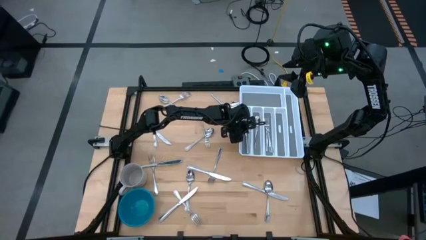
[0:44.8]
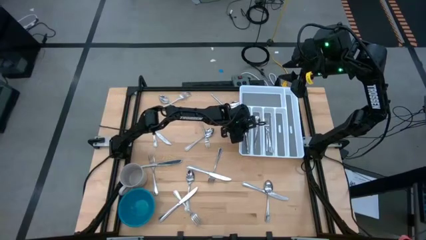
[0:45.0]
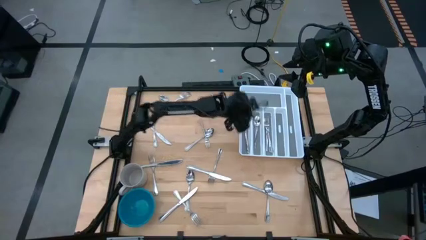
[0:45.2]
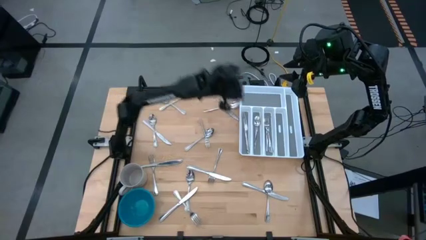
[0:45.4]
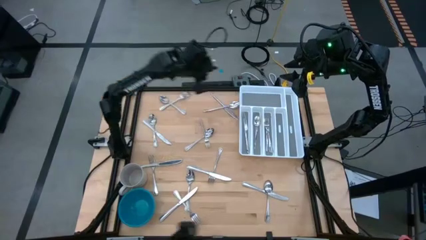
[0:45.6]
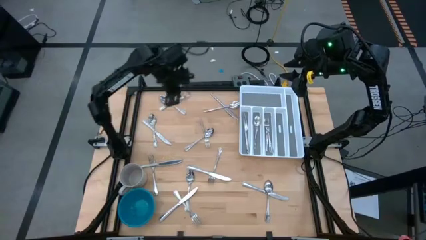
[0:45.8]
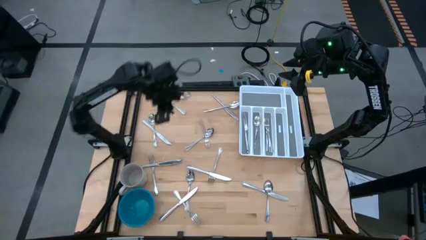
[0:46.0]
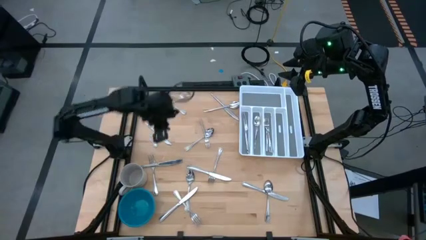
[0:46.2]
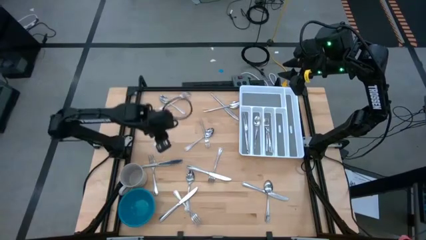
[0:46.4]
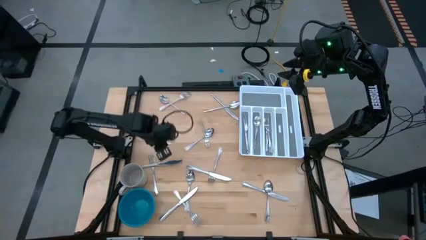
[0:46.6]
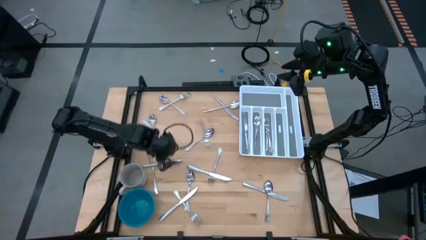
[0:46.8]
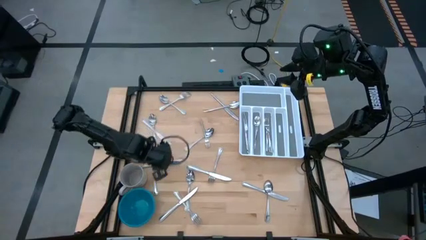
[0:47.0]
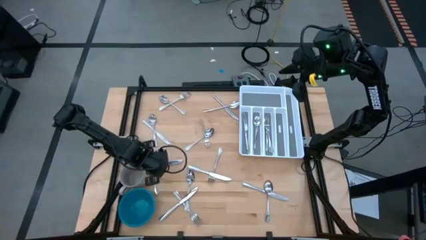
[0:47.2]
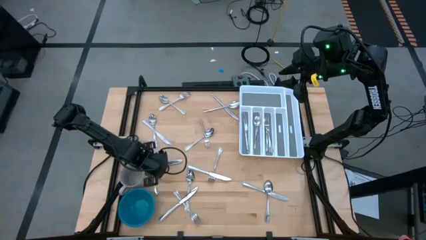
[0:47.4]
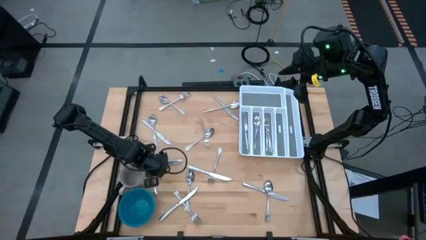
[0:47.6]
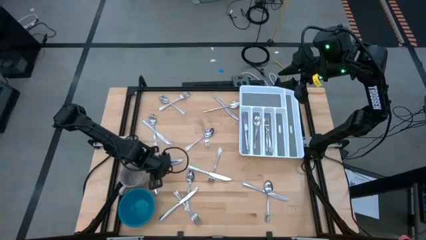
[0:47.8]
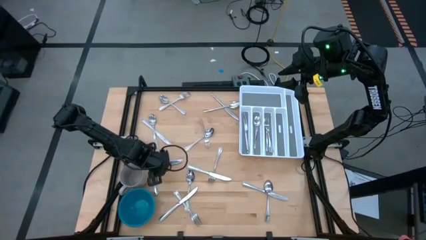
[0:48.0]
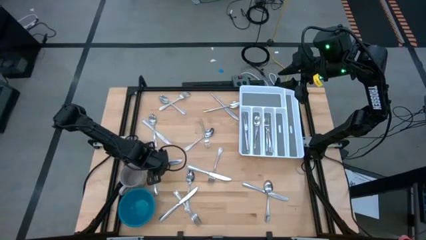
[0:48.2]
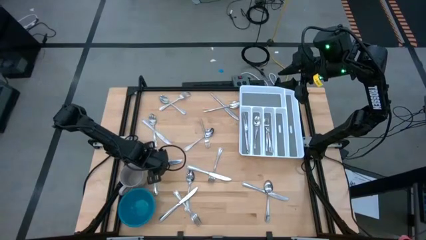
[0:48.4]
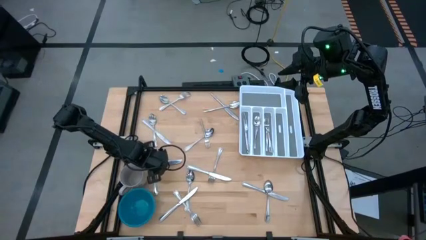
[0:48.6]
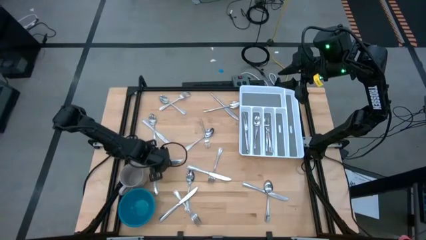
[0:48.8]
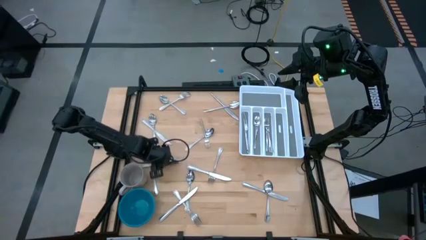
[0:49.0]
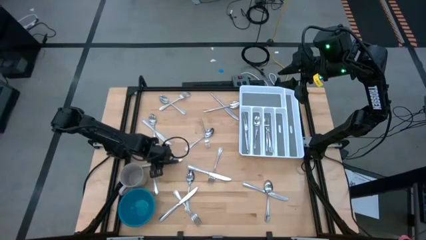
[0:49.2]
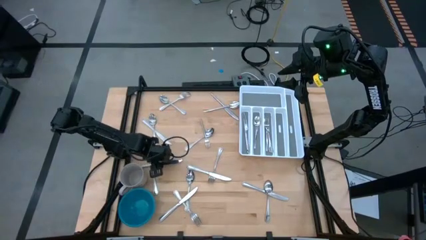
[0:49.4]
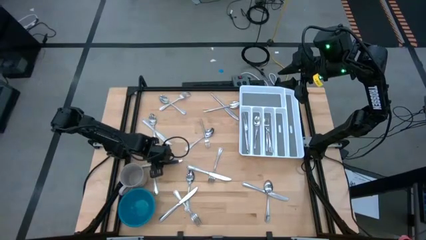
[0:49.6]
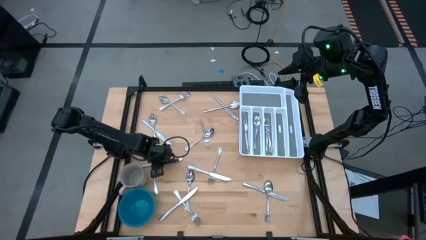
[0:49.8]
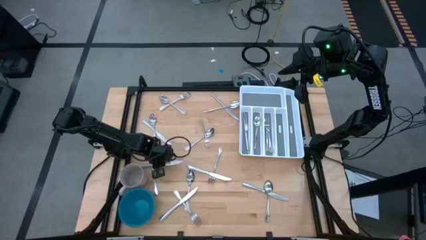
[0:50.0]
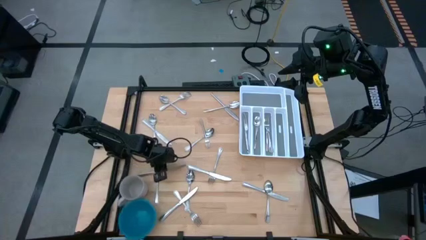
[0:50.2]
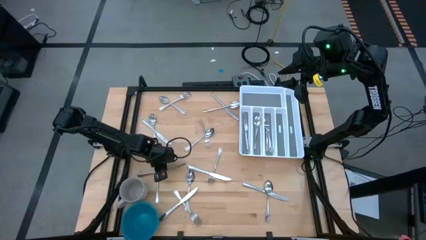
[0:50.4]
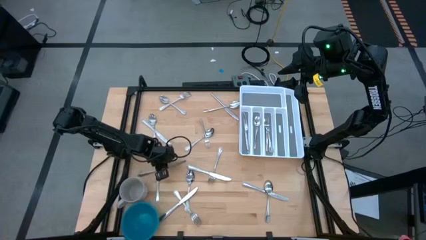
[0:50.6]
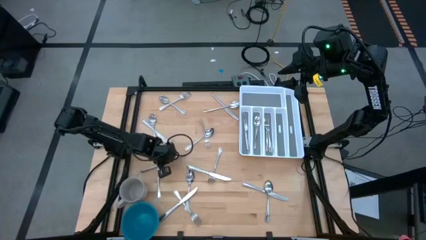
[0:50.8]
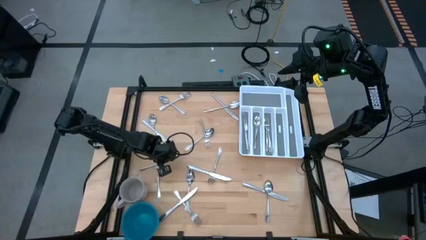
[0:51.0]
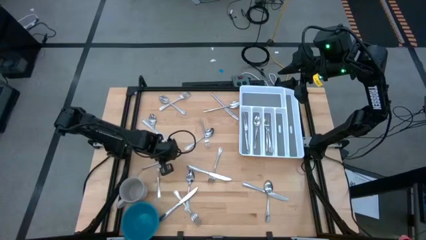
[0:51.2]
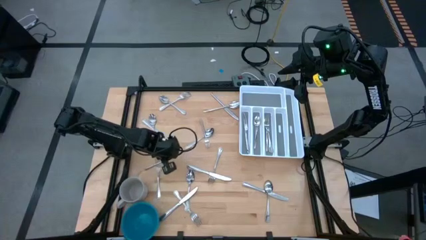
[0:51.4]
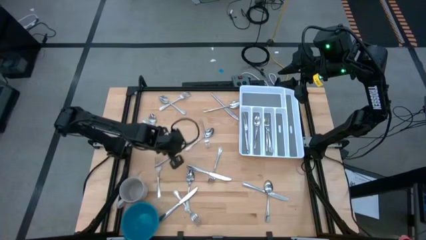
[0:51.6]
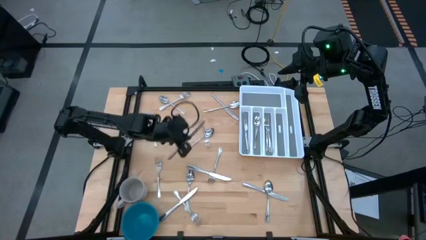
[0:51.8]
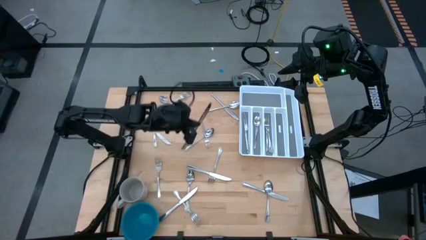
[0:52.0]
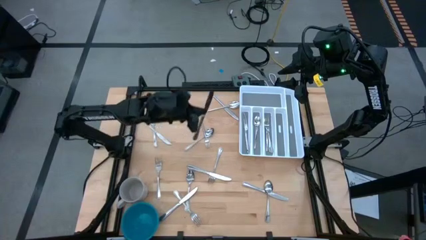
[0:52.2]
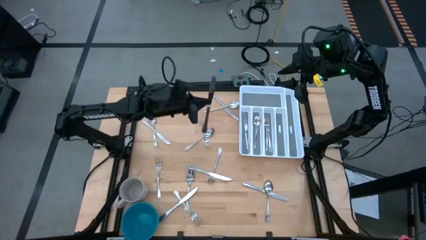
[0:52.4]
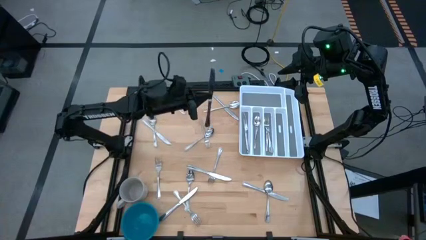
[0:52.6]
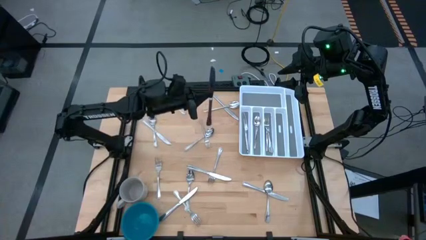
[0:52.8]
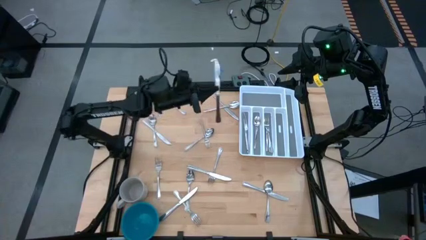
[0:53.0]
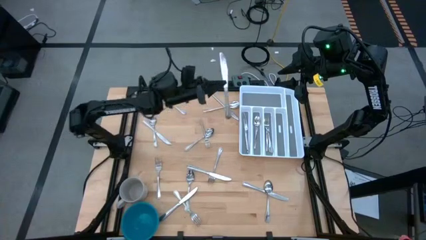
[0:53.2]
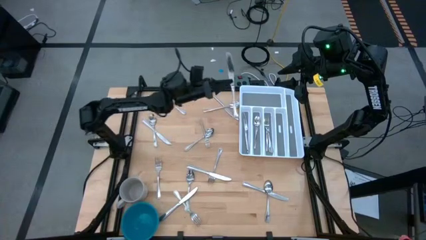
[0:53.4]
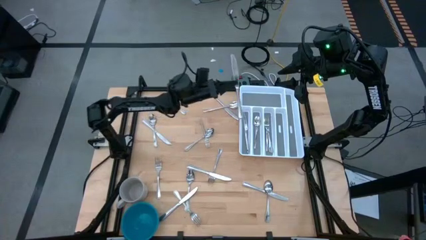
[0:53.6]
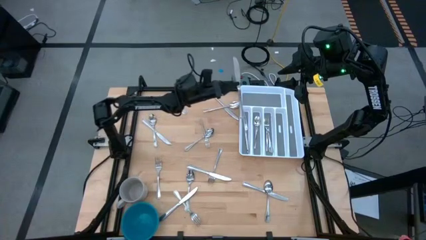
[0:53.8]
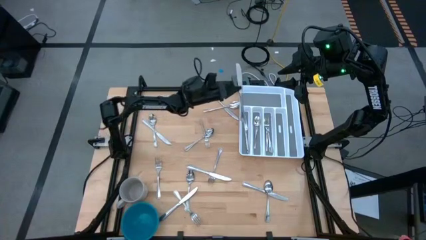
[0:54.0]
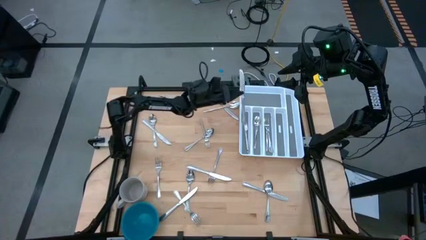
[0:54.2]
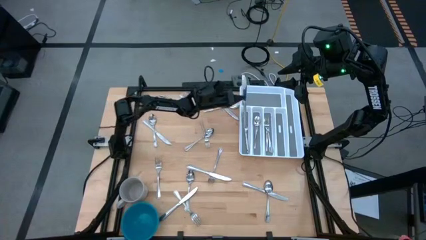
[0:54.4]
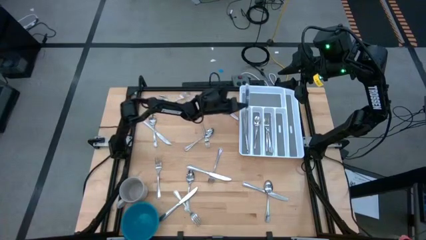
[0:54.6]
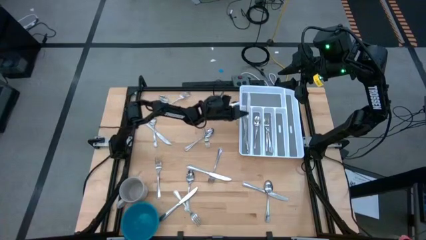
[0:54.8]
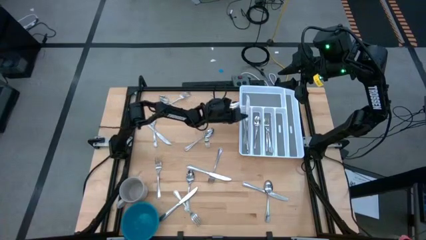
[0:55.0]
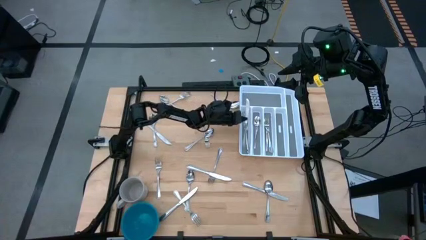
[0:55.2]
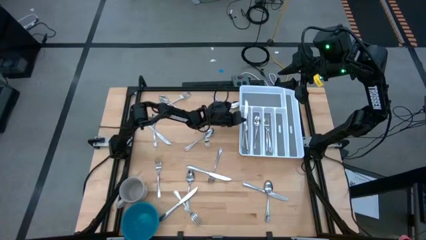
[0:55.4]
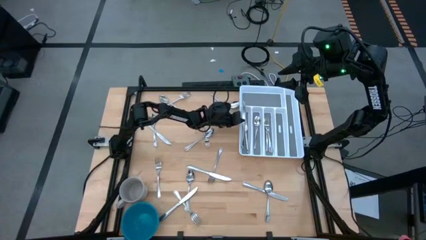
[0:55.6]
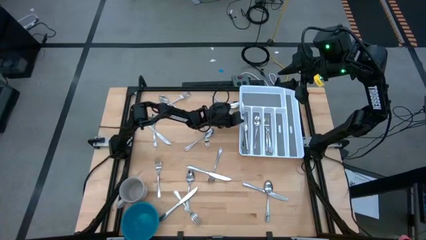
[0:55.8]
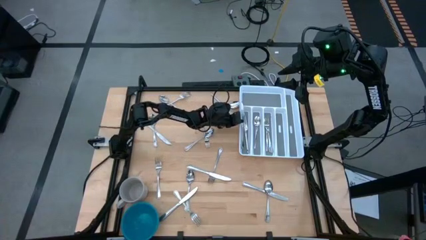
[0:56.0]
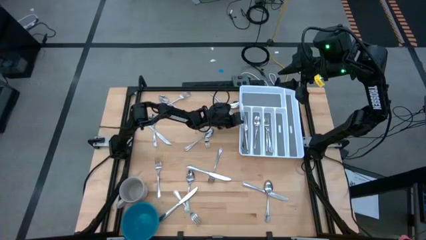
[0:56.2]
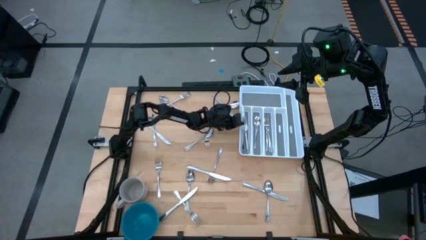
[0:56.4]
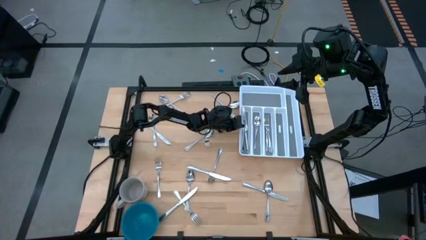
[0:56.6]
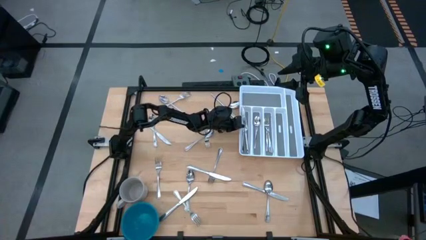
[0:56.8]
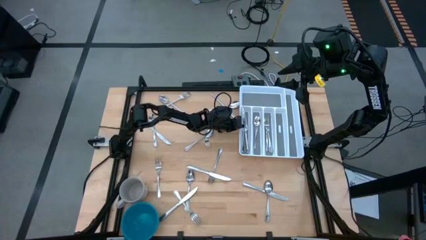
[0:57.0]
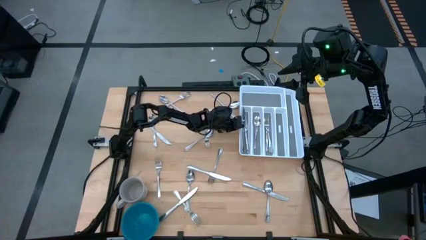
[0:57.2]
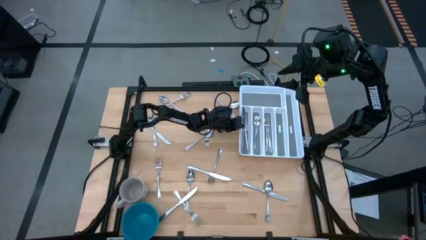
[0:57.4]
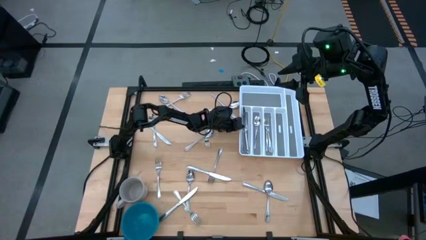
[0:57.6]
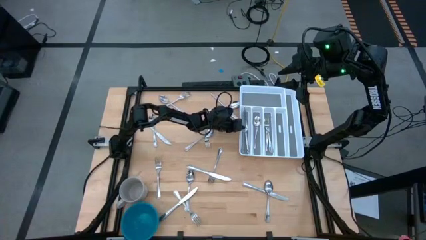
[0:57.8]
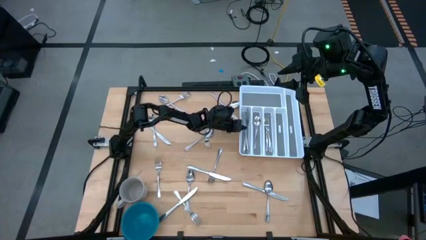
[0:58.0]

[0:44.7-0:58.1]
Task: Sort silverware
Put the table knife into the silverware tray
